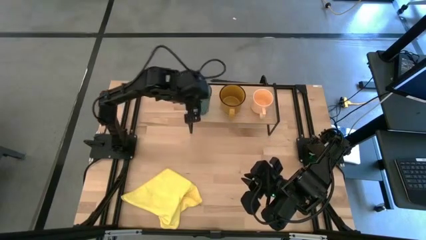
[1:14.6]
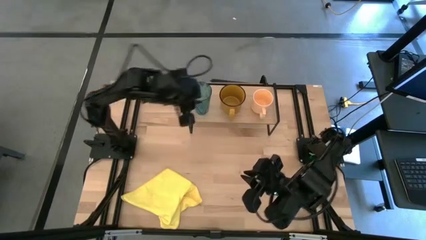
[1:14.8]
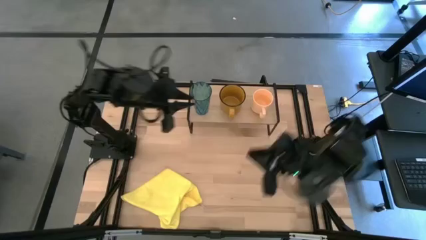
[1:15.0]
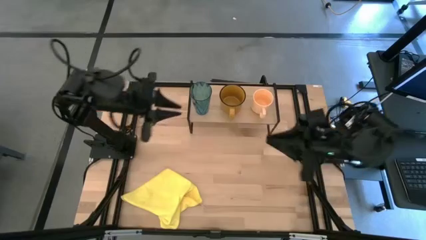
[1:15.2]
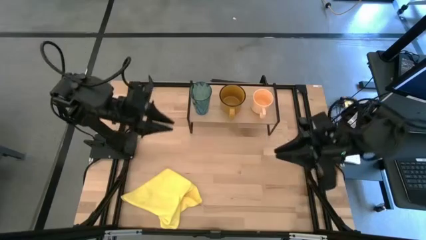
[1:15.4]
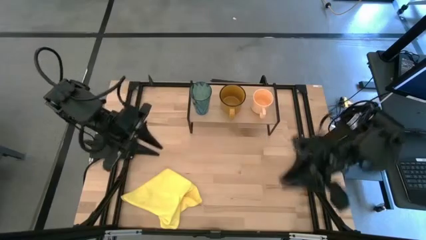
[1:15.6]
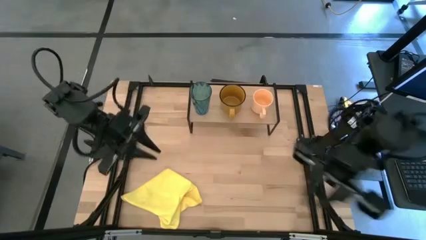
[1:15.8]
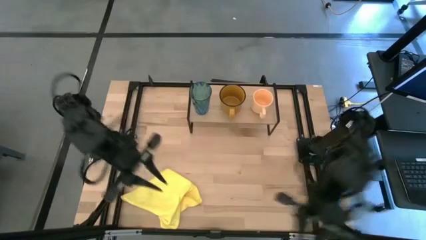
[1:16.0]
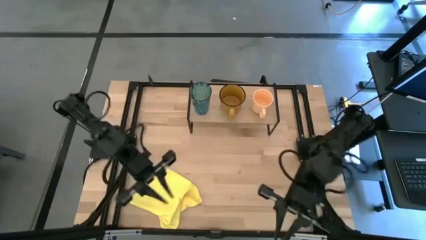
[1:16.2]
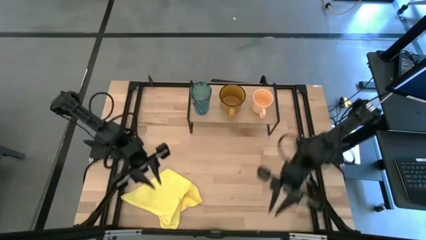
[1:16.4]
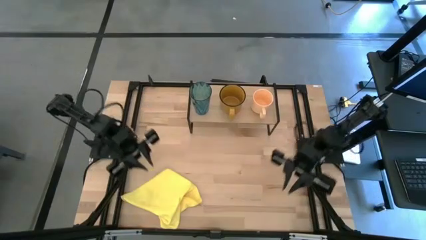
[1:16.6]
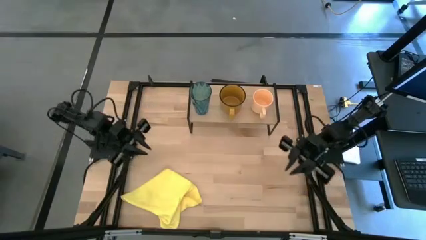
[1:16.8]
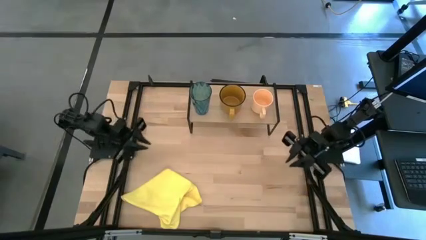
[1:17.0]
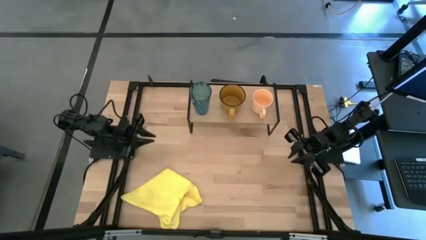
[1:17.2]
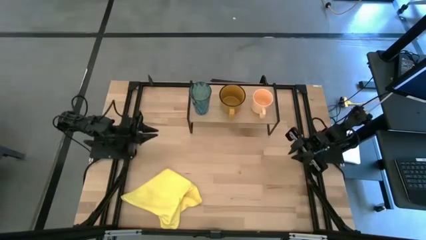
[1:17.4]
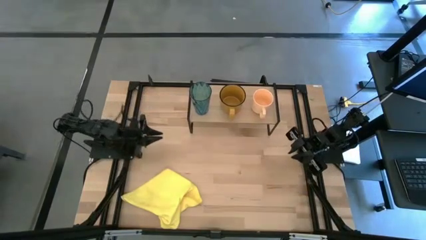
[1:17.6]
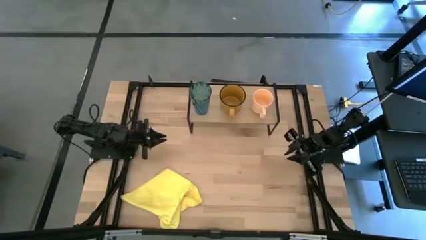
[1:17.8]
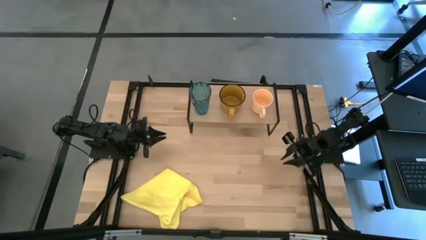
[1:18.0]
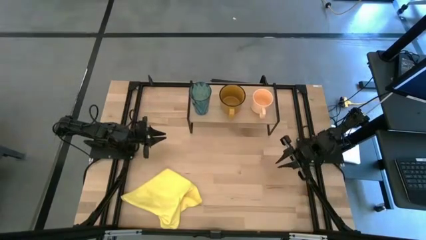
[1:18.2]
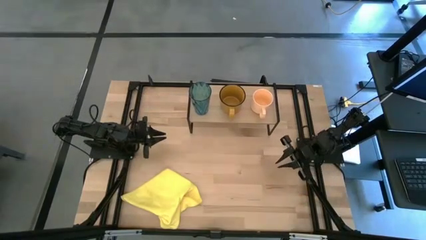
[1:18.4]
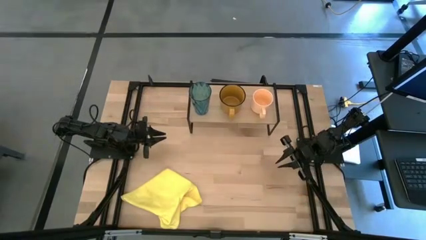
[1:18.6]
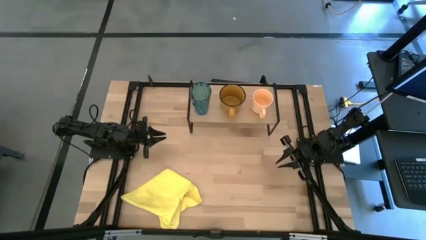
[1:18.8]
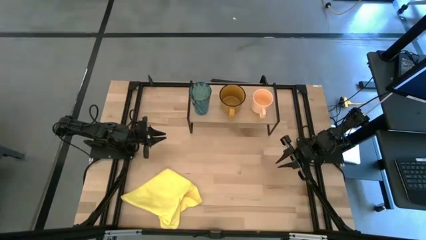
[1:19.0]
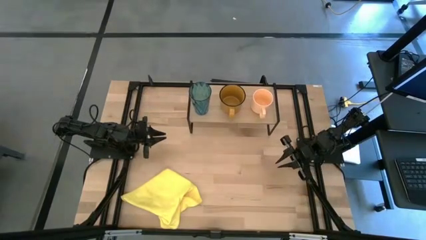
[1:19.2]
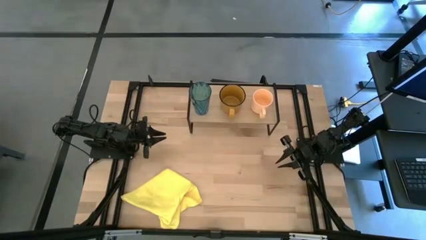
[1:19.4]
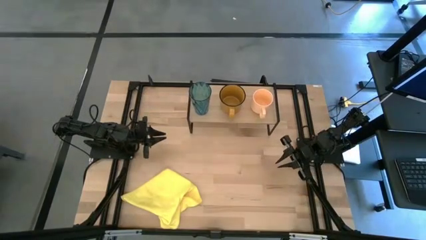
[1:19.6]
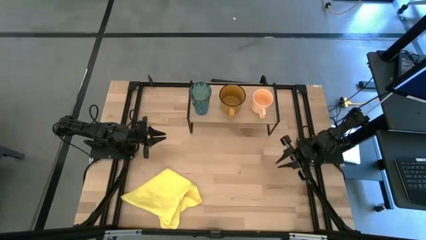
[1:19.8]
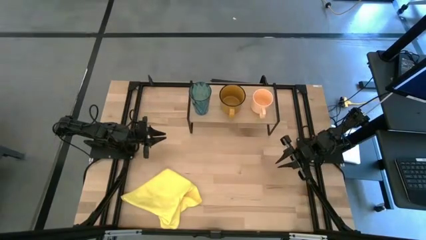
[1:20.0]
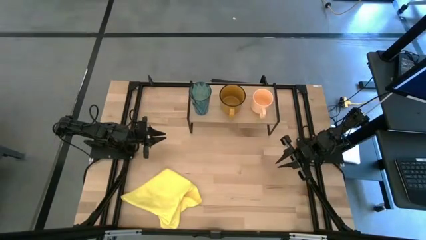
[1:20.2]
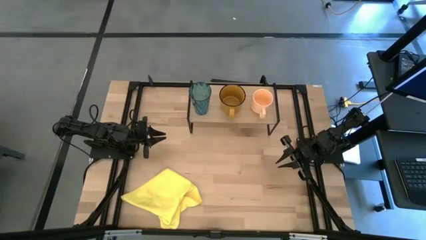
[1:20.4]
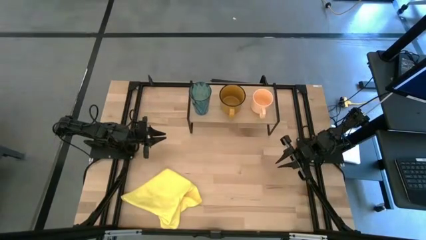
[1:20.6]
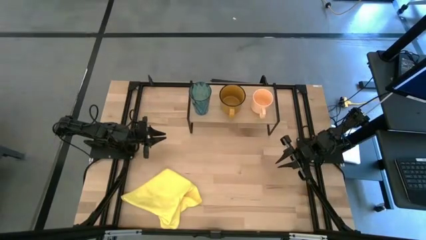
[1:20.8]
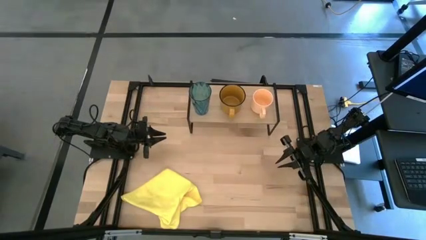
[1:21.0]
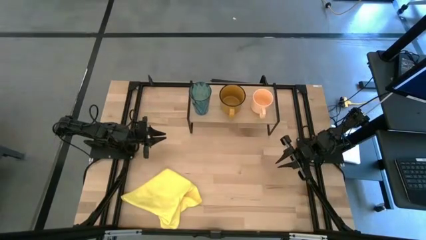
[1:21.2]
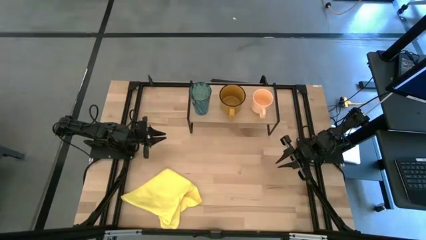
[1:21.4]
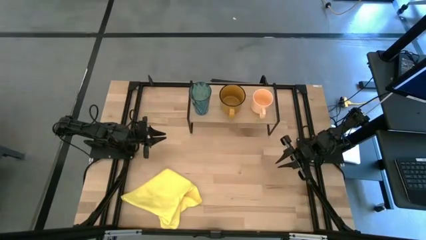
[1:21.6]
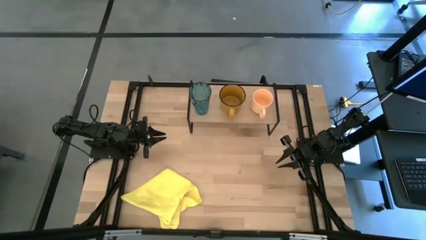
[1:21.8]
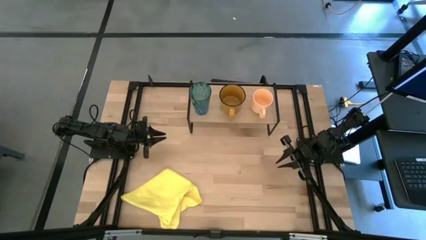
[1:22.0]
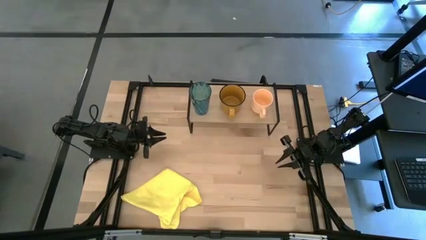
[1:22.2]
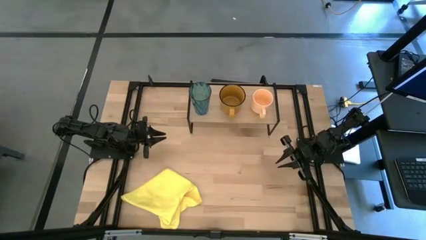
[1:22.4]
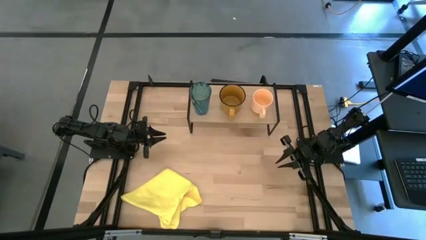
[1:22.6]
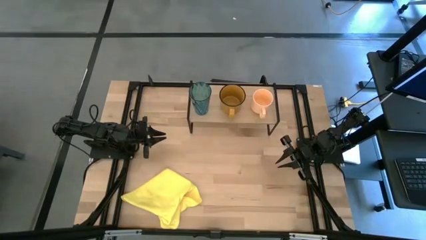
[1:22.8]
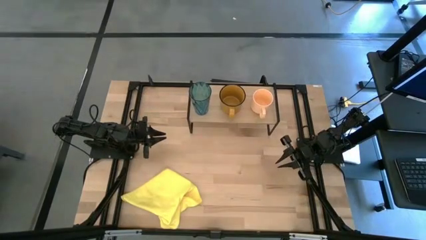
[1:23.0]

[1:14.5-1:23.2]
Task: Stack small to large cups/mugs on shelf
Return to Home Position

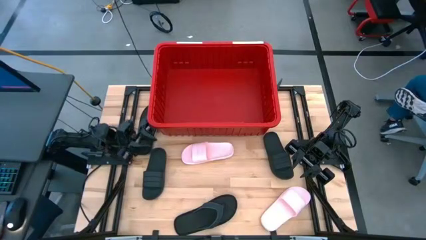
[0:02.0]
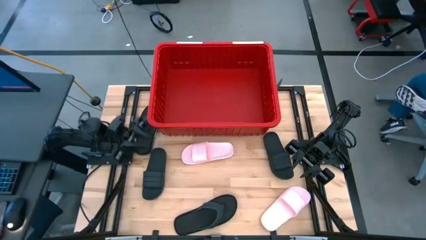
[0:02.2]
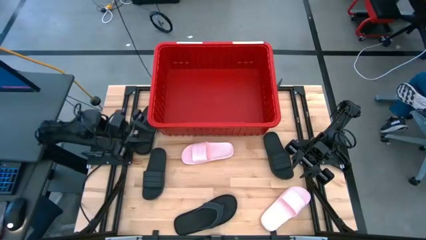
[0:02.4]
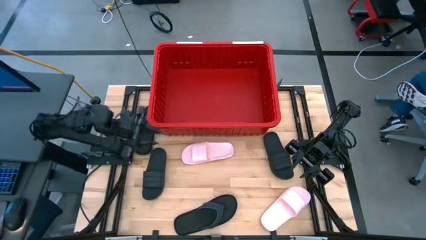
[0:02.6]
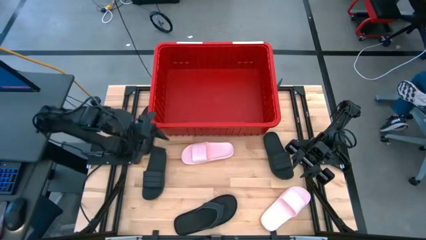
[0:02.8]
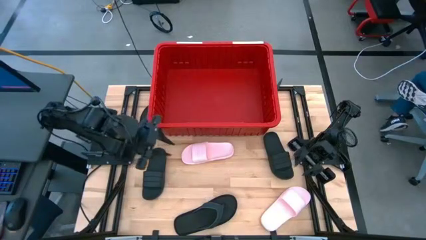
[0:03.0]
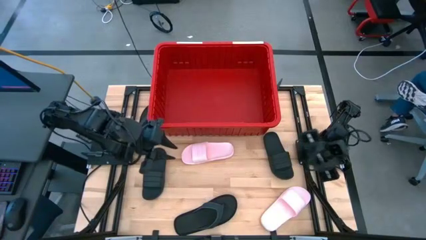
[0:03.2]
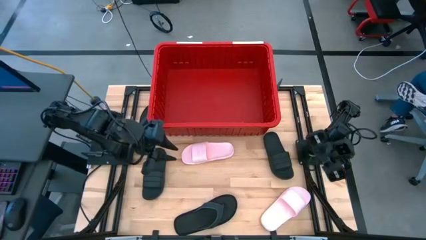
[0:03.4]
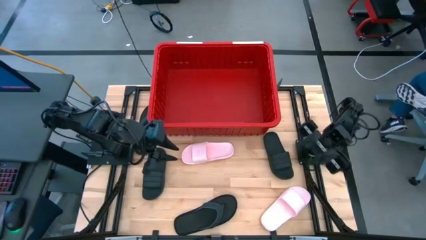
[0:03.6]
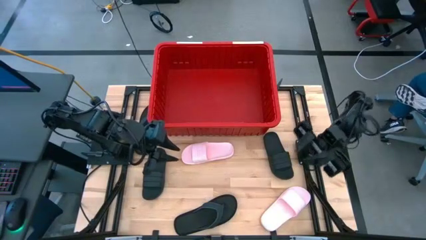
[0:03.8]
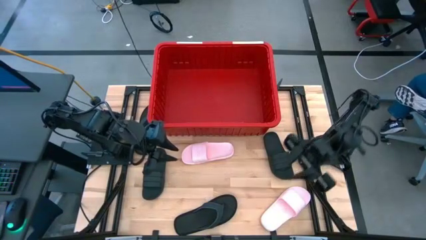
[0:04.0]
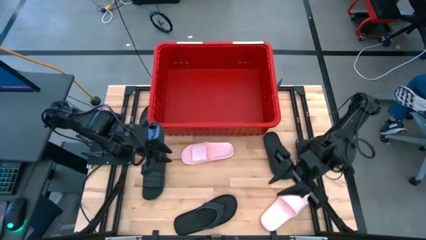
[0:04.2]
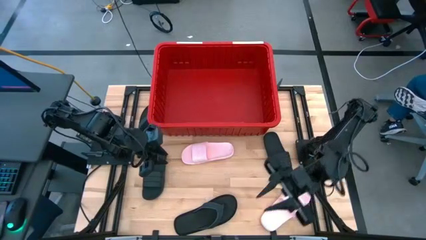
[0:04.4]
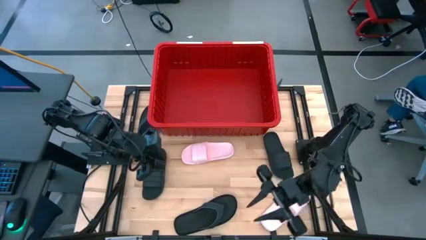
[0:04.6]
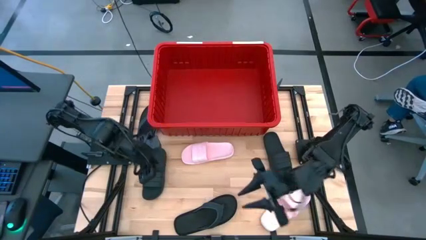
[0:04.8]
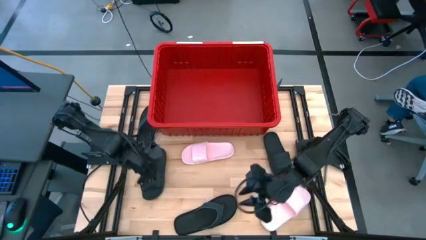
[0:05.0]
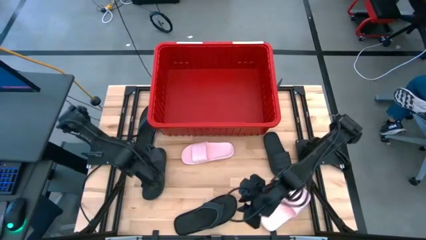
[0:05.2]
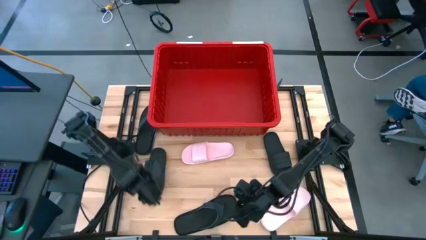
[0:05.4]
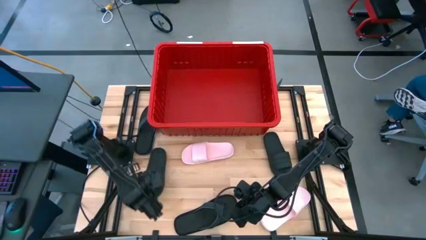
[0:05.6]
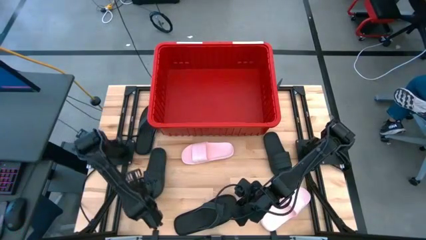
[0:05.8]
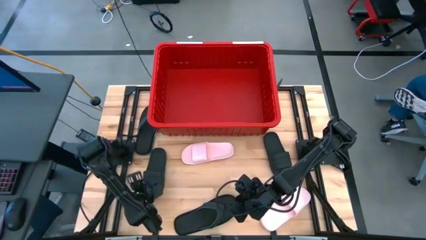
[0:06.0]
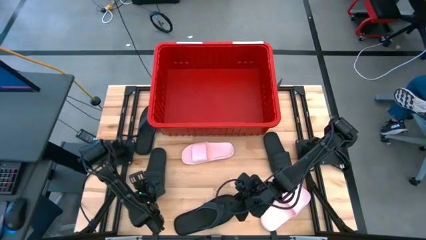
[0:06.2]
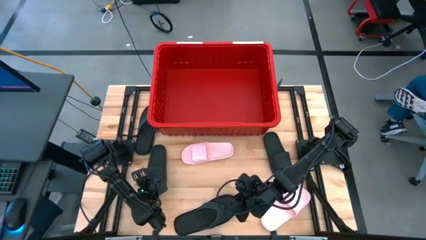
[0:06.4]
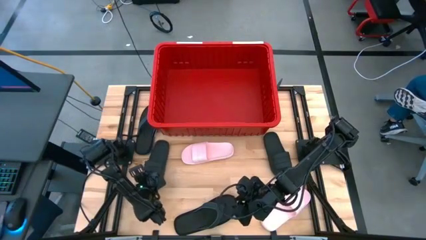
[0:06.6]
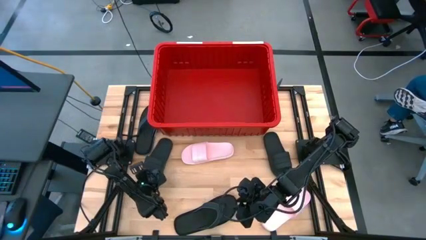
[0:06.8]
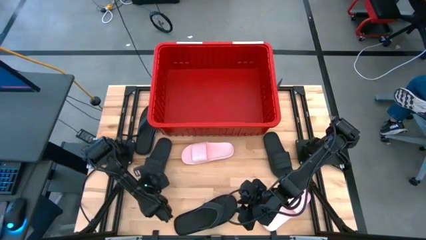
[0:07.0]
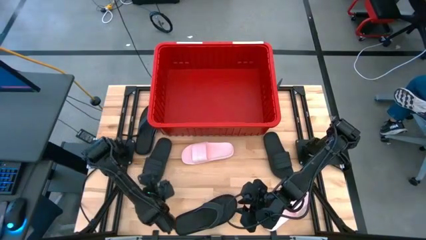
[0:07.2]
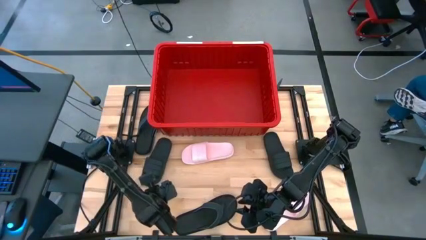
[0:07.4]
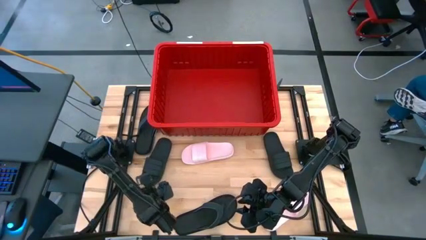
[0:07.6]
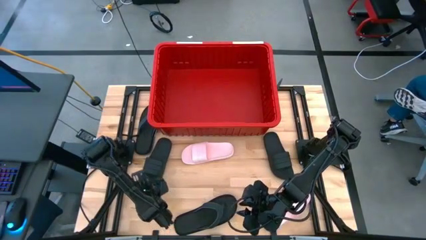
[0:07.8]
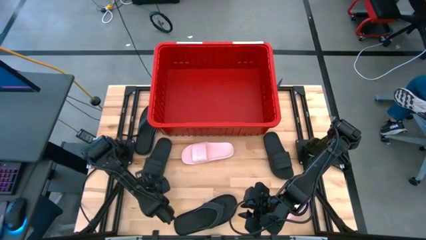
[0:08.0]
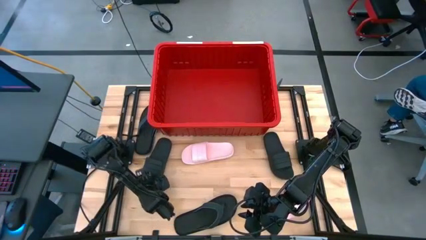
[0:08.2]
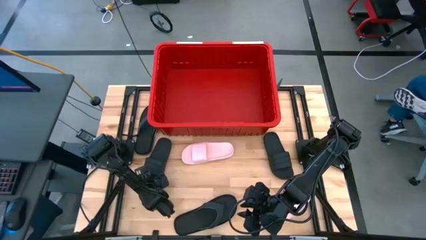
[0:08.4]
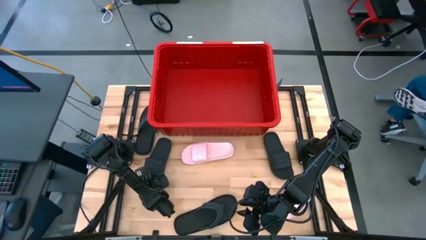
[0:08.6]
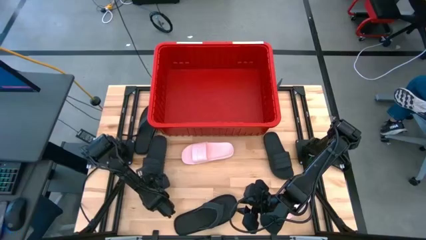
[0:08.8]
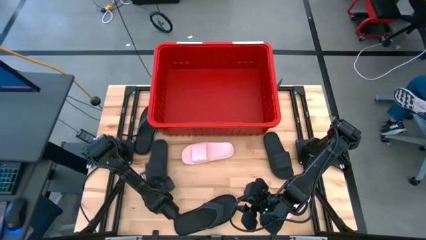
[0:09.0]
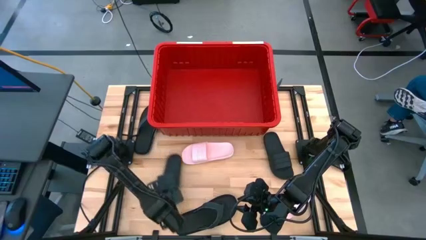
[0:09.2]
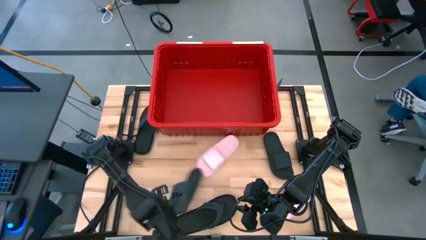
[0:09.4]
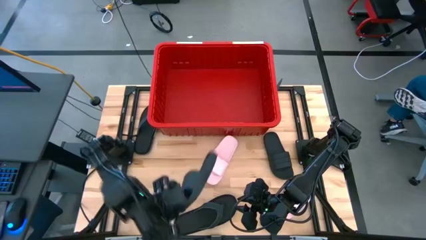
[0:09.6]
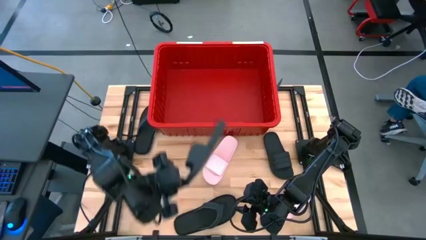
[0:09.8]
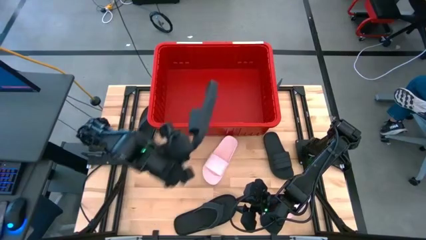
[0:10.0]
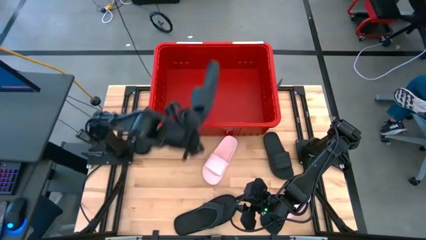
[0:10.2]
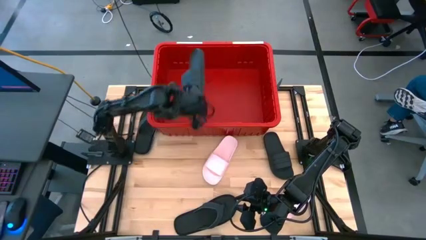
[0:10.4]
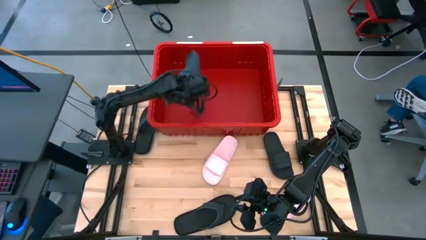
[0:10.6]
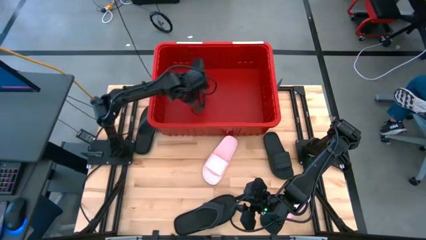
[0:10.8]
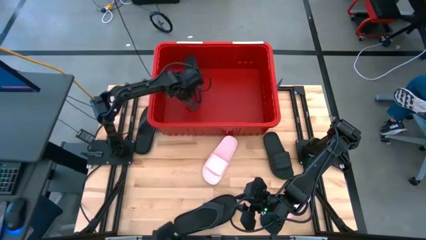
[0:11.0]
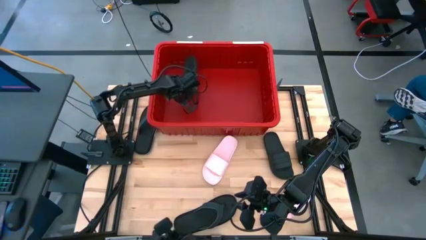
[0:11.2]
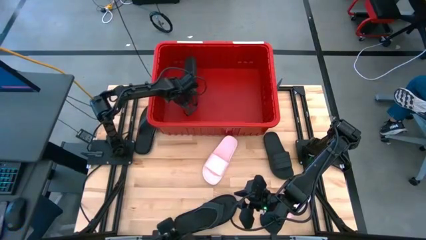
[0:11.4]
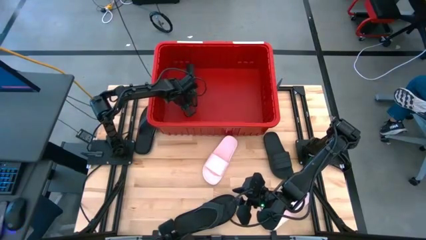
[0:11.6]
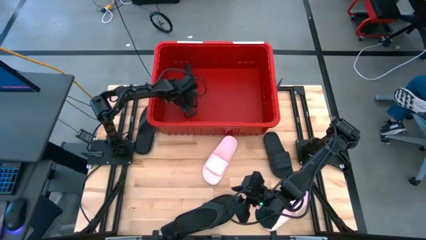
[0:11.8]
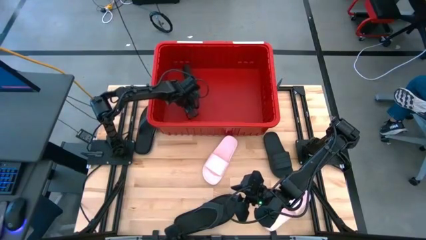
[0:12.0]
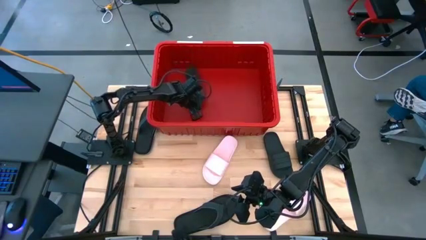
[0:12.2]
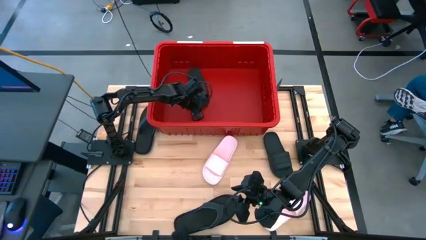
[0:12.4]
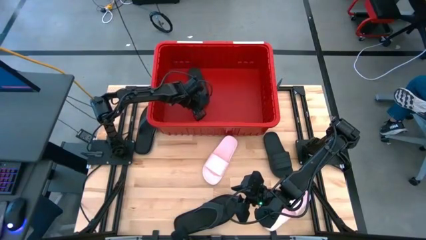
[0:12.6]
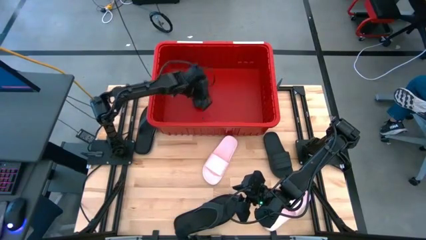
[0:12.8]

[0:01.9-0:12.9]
Task: Pick and place slides into bin
Put the left black slide in the red bin
